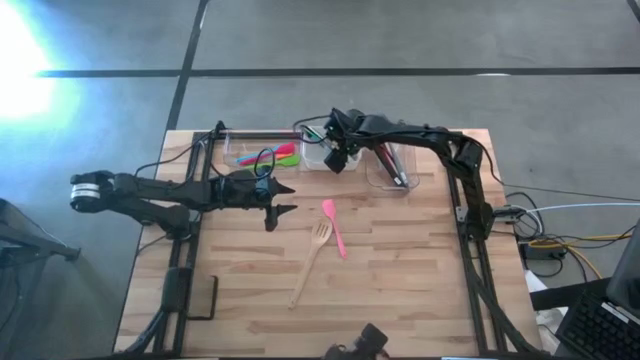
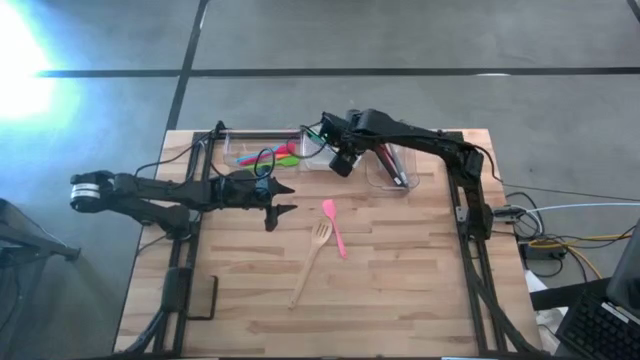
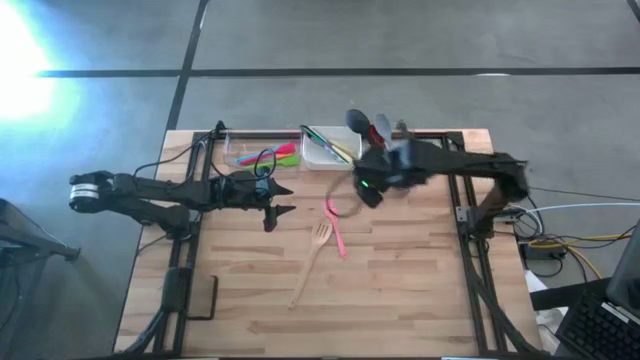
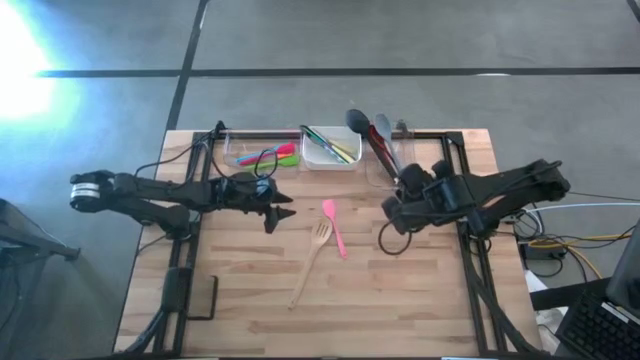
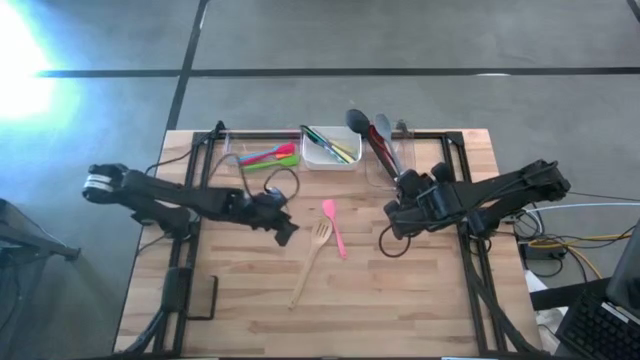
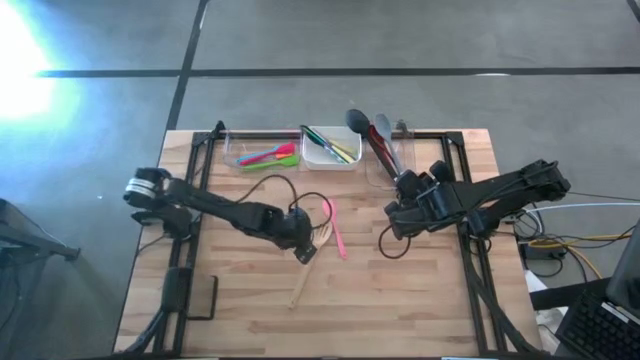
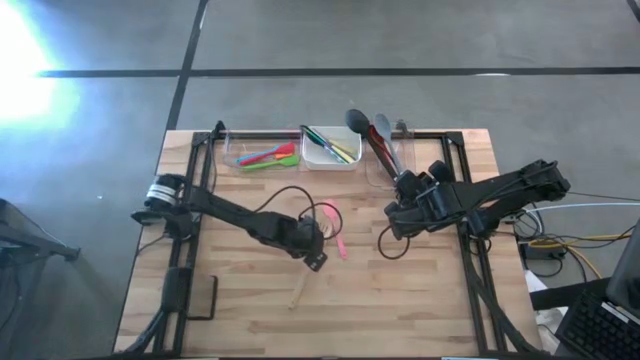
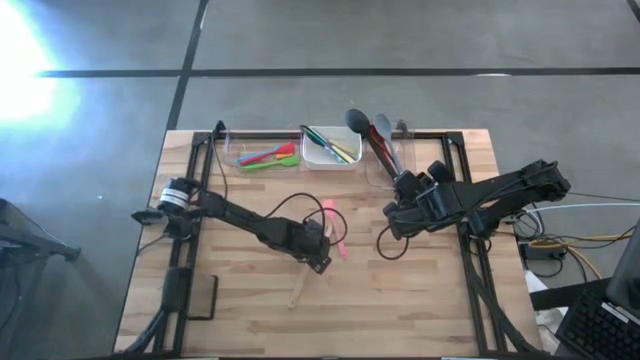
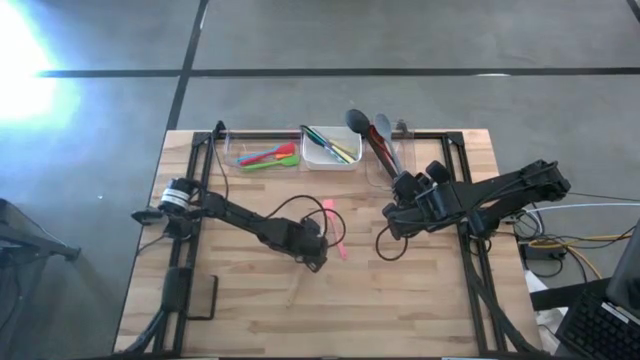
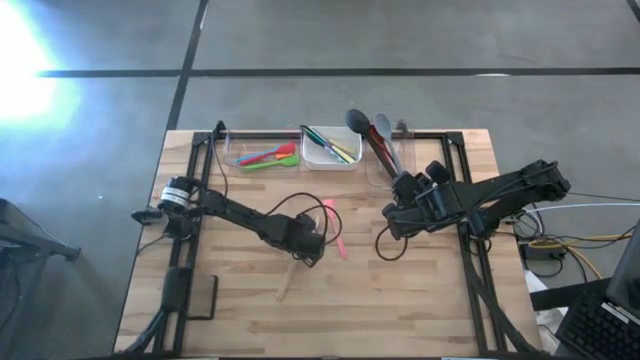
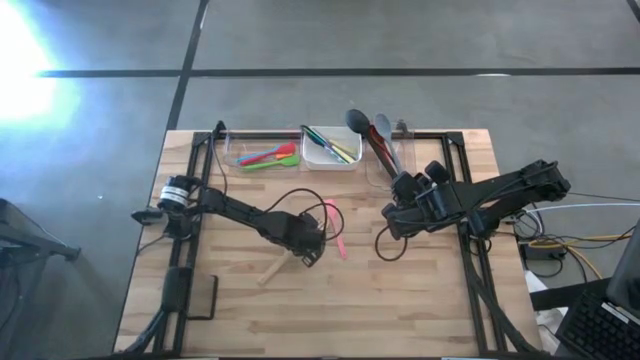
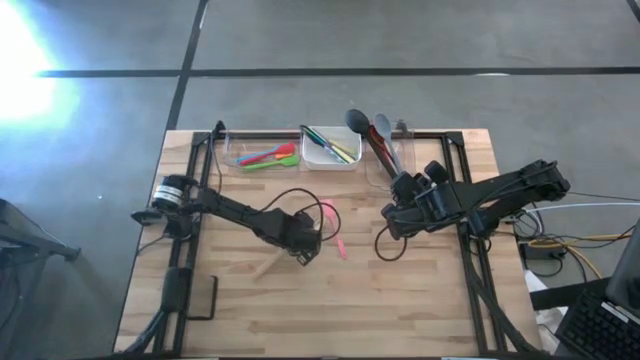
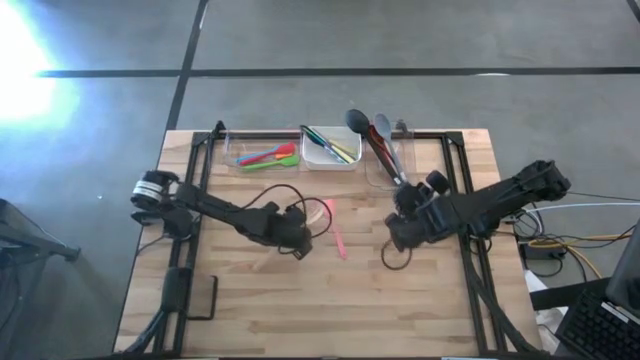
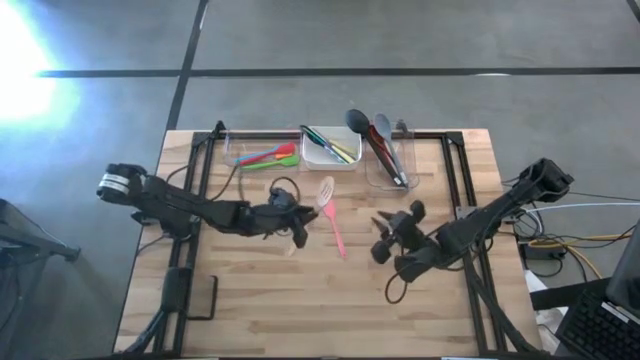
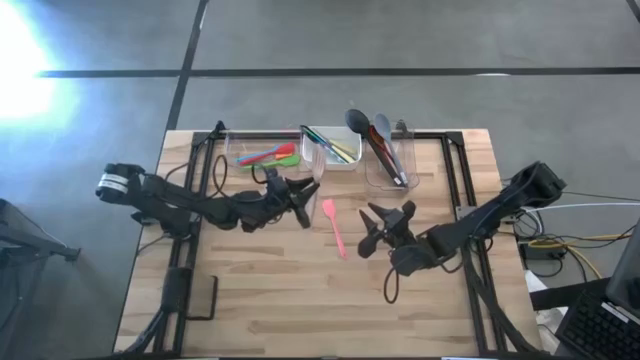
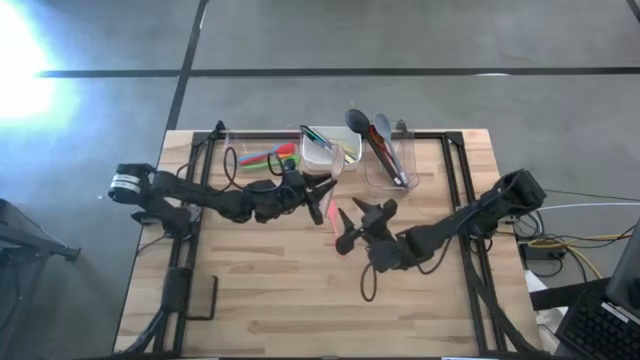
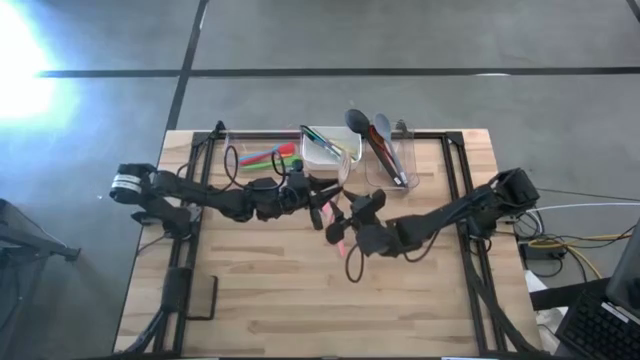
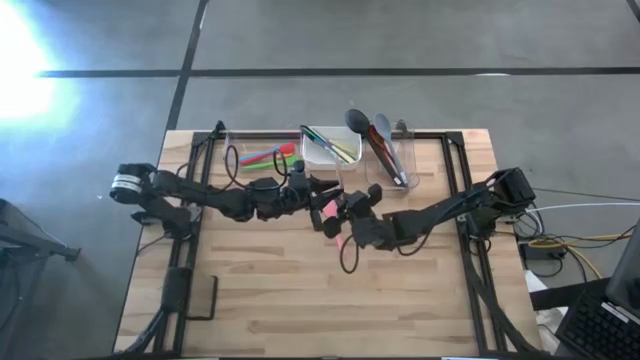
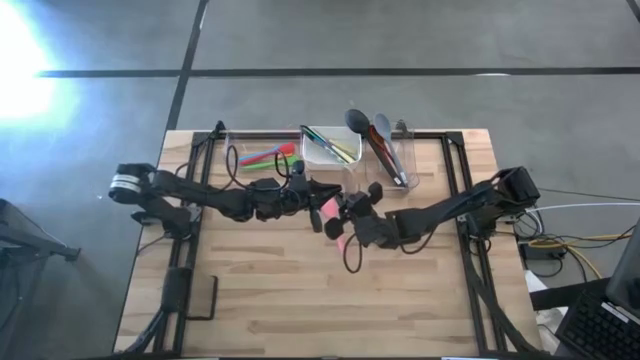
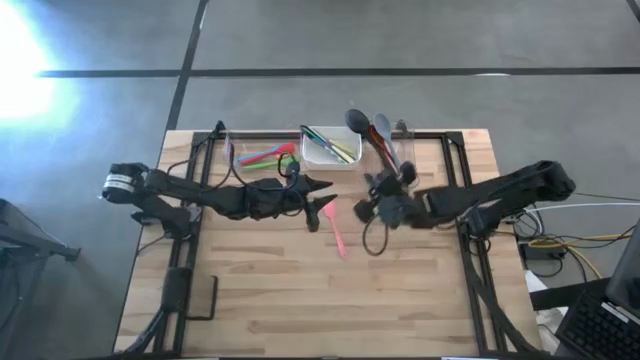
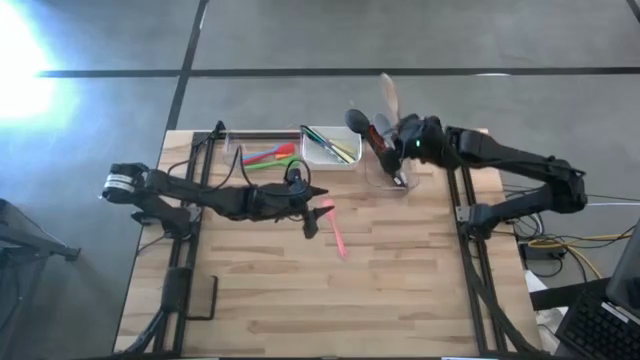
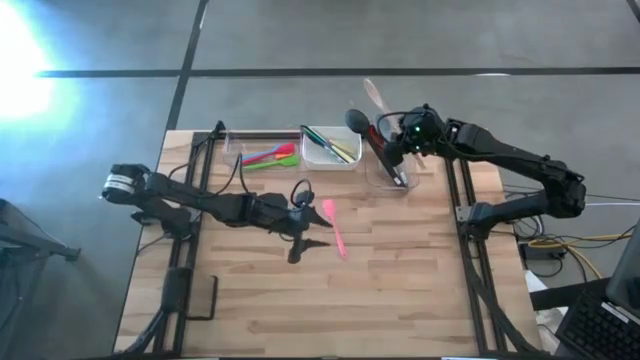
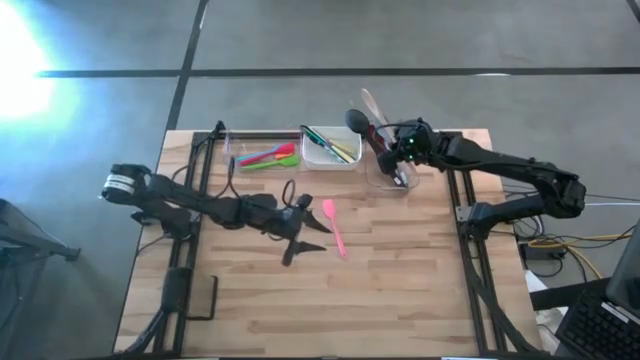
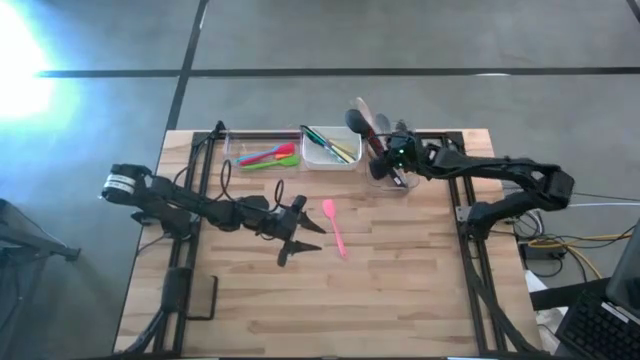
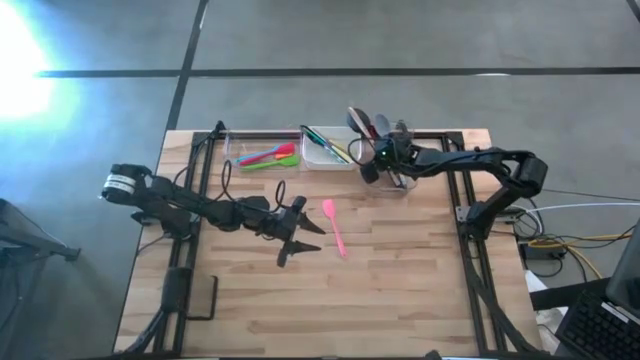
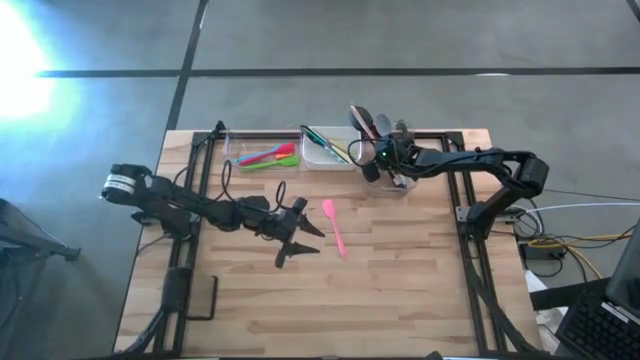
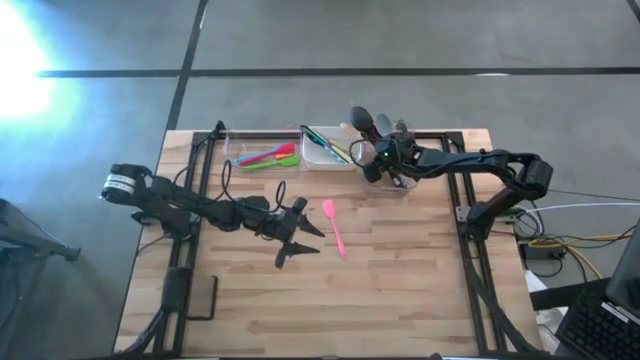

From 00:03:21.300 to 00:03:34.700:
Task: Pick & Place Kitchen Items
Put the brown spatula into the right transparent bin

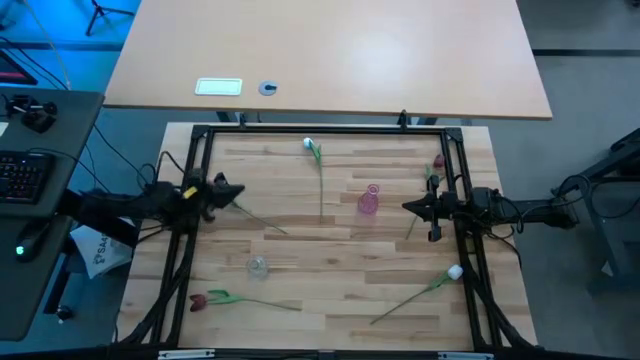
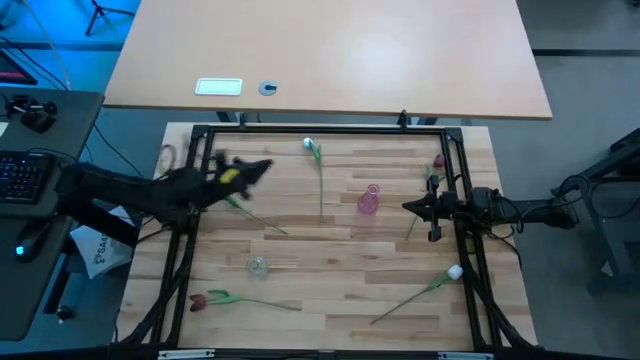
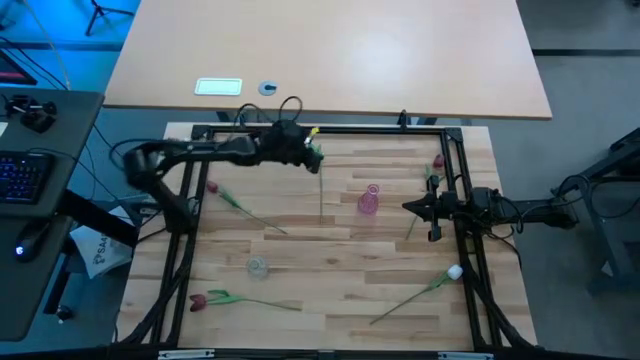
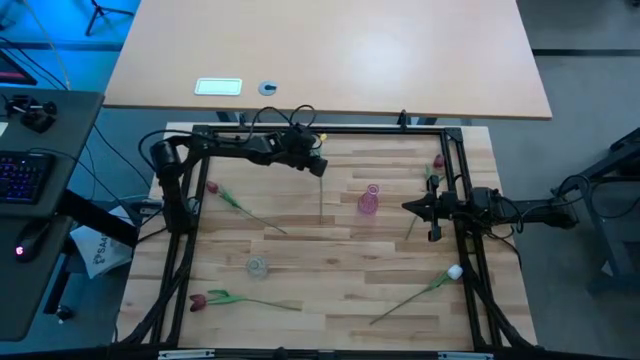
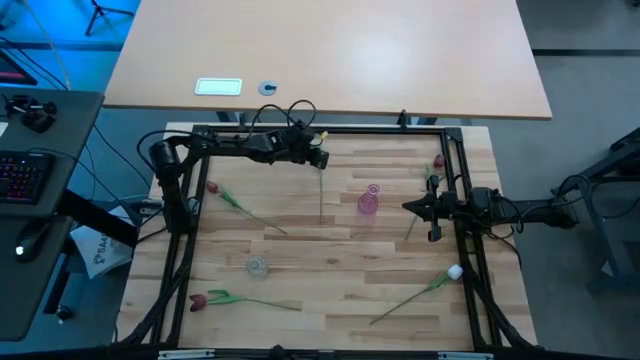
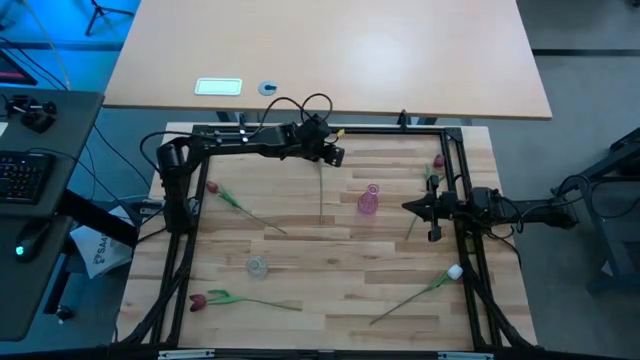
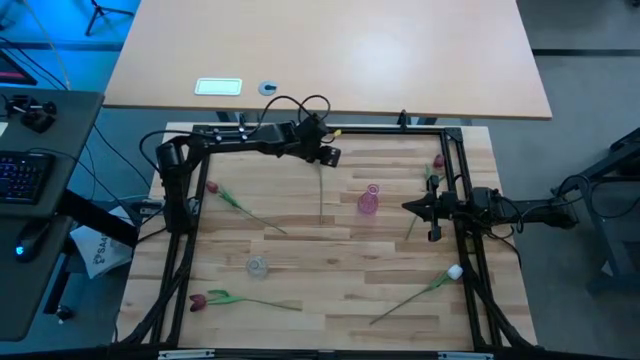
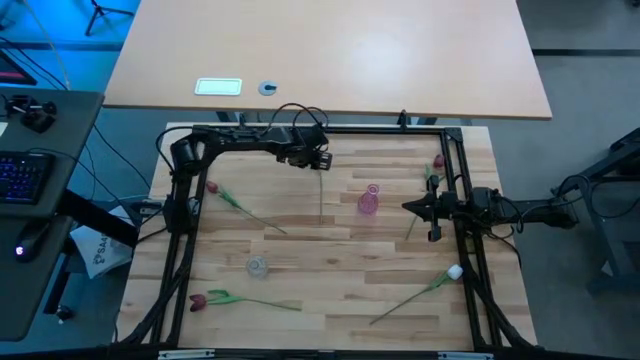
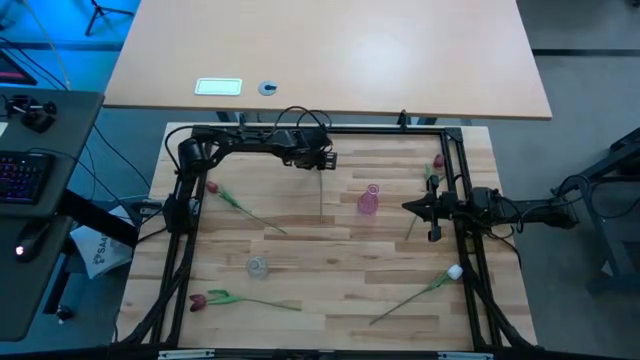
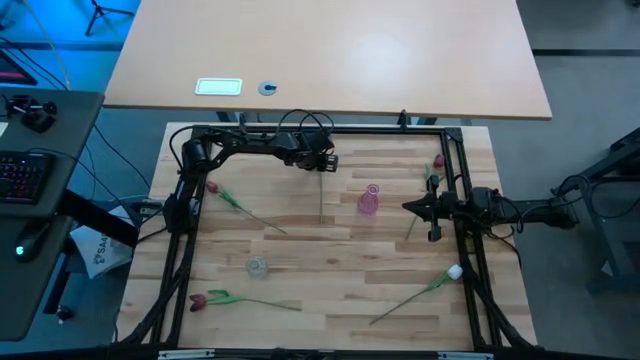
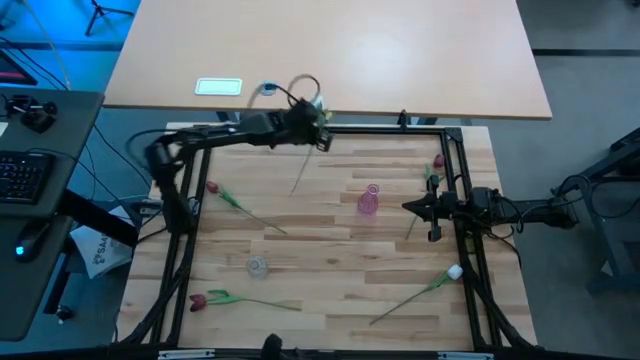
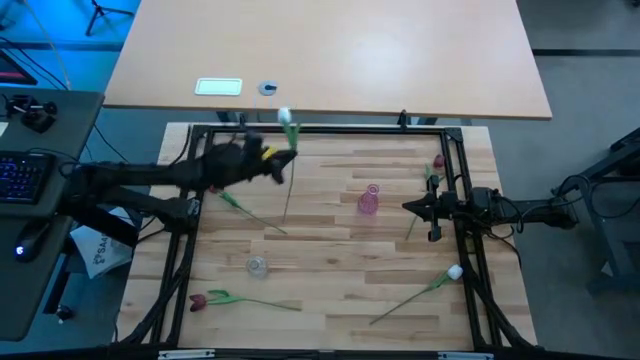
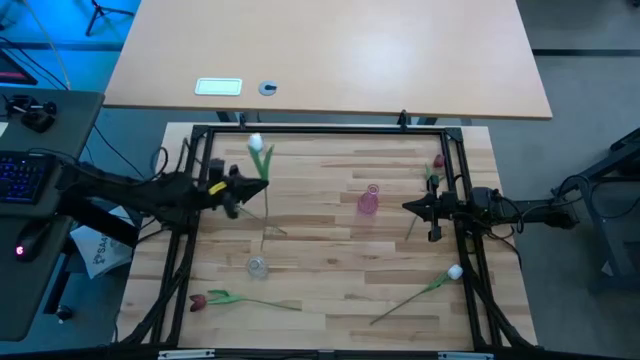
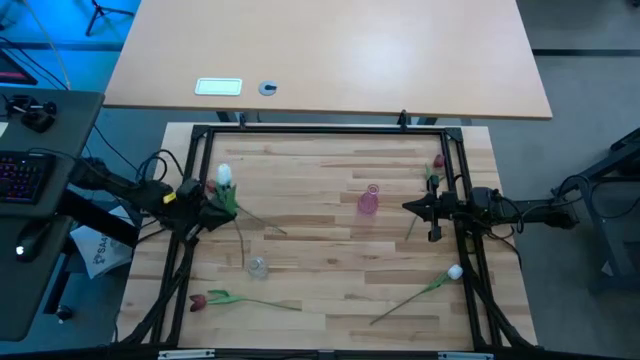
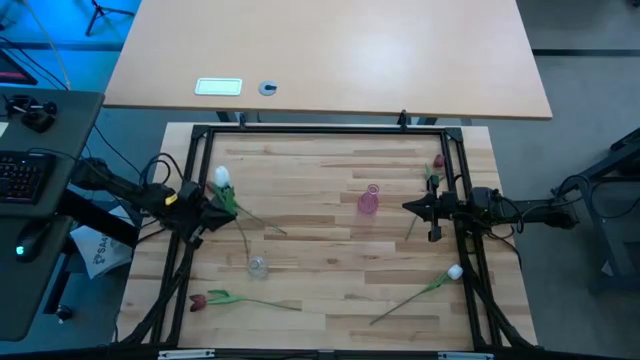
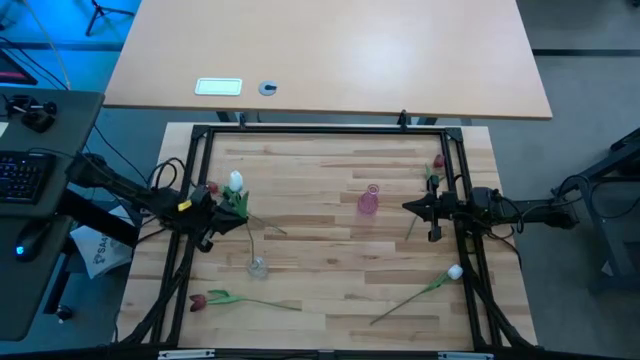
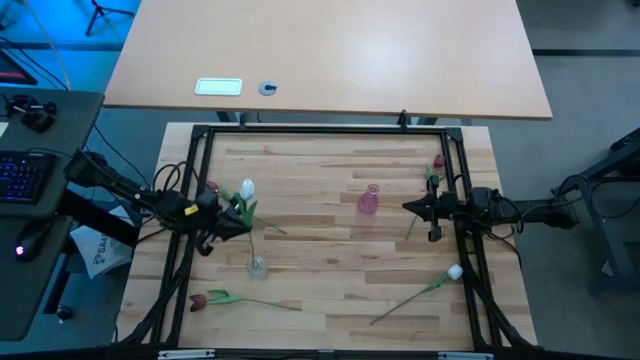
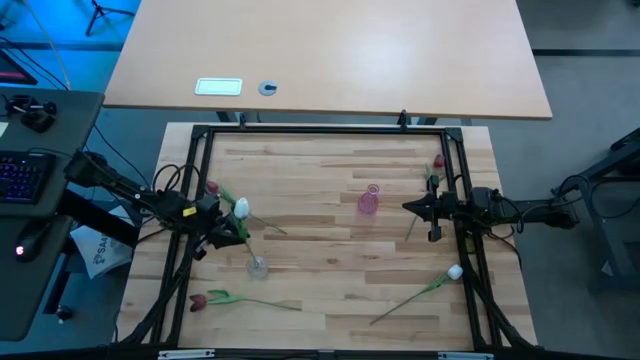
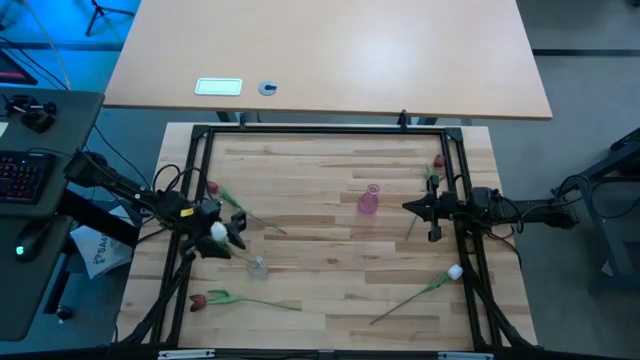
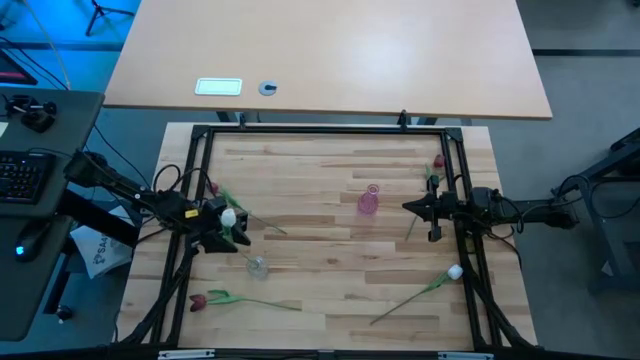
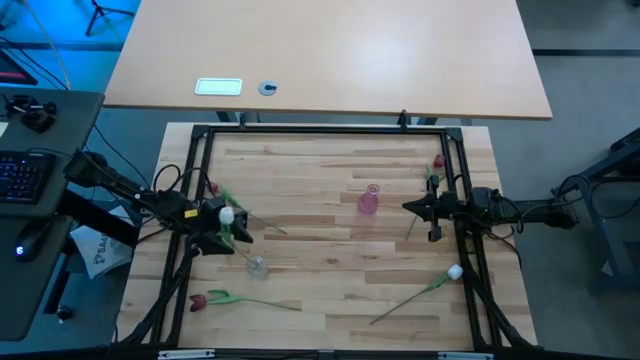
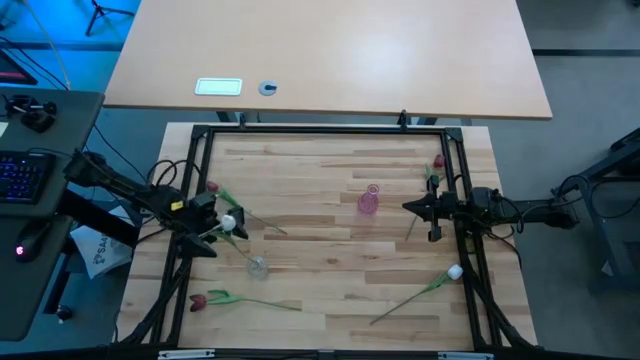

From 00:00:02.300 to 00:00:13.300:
Task: Sort flowers into vase by color
Put the top white flower into the transparent vase
